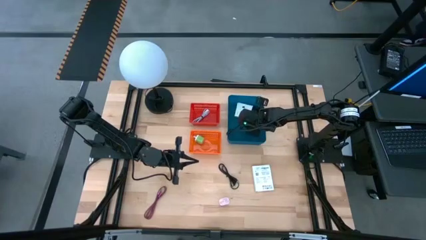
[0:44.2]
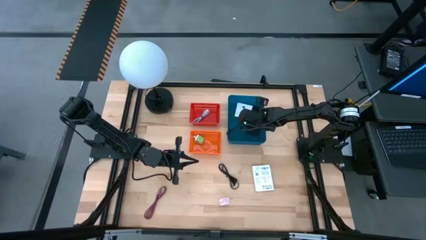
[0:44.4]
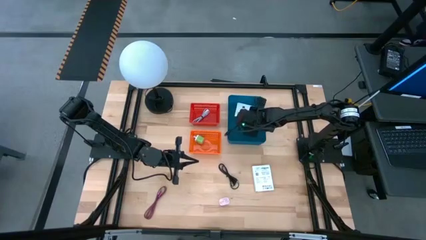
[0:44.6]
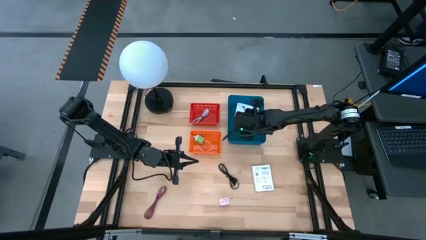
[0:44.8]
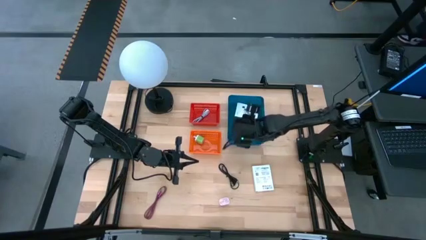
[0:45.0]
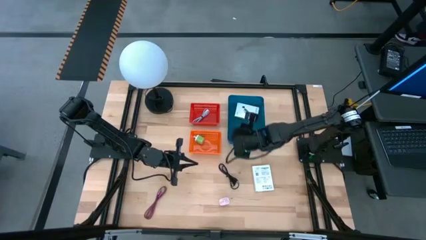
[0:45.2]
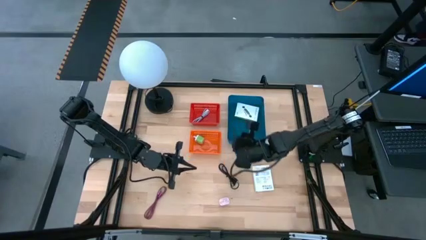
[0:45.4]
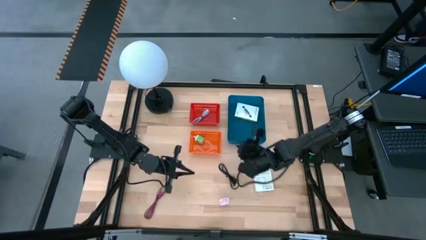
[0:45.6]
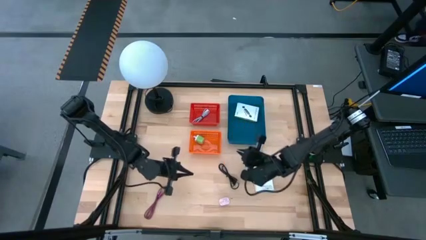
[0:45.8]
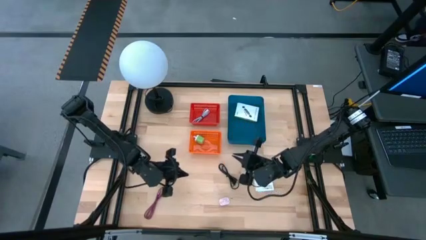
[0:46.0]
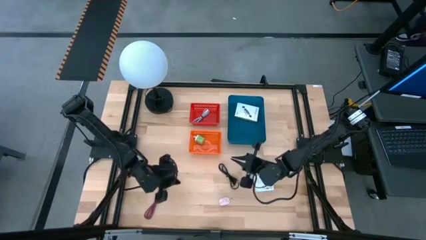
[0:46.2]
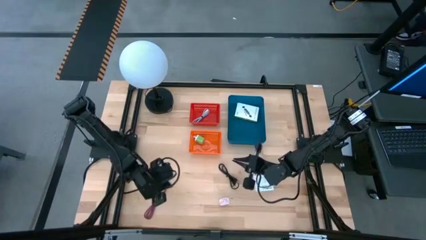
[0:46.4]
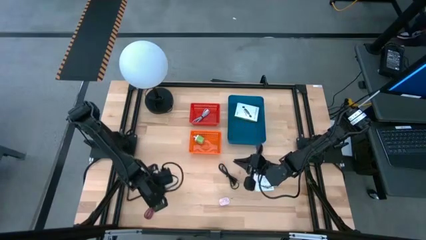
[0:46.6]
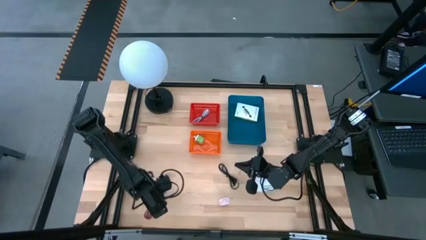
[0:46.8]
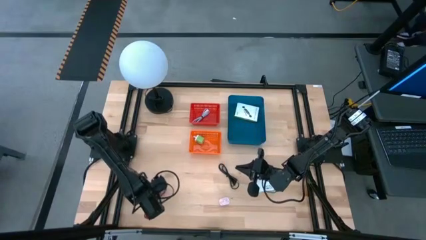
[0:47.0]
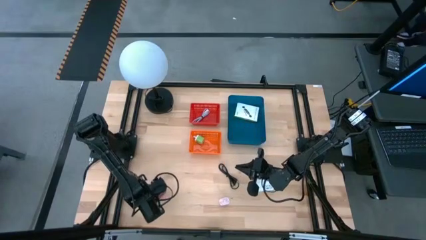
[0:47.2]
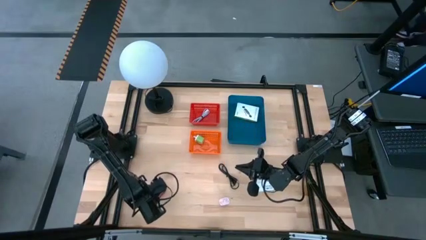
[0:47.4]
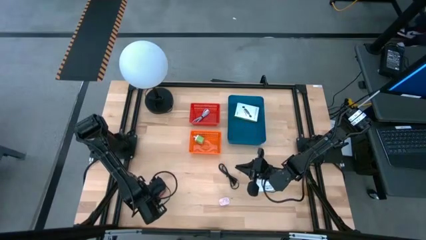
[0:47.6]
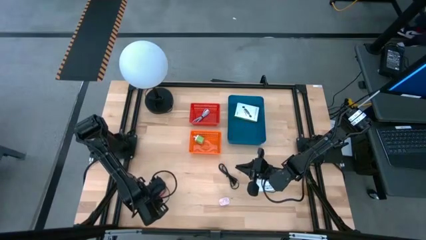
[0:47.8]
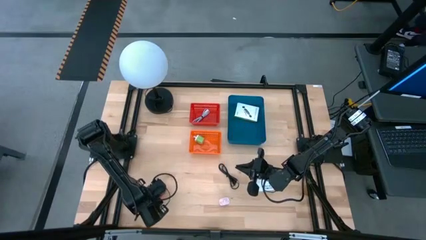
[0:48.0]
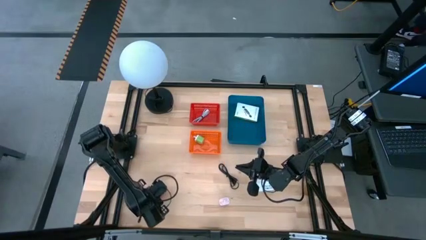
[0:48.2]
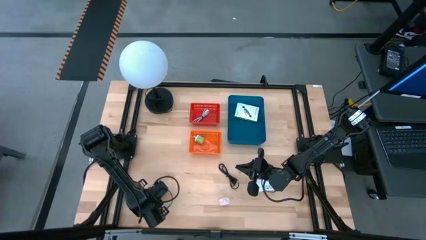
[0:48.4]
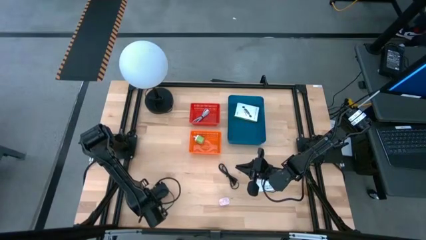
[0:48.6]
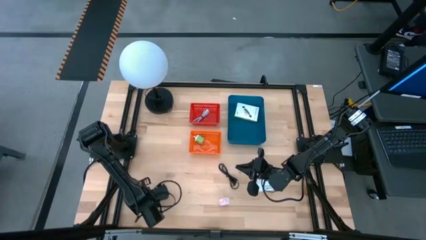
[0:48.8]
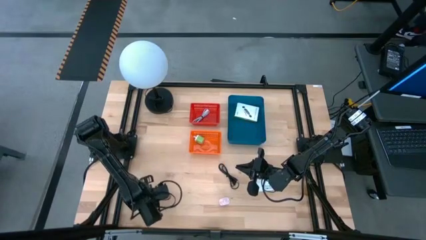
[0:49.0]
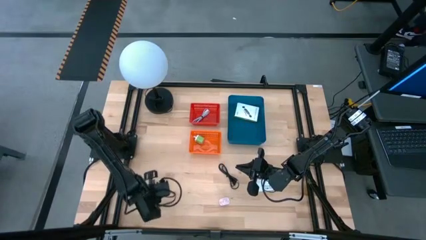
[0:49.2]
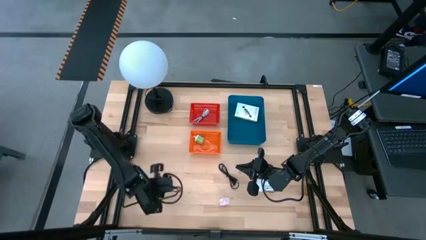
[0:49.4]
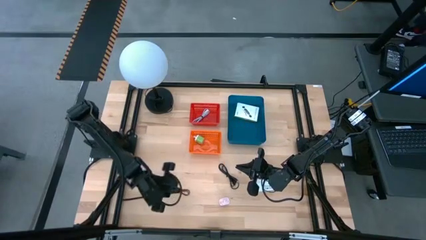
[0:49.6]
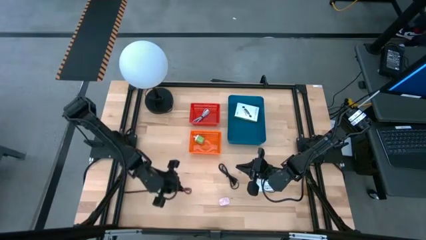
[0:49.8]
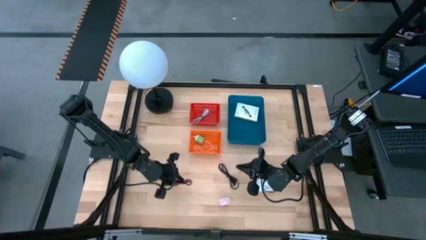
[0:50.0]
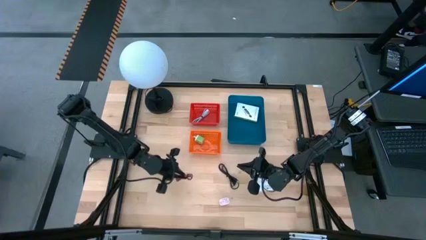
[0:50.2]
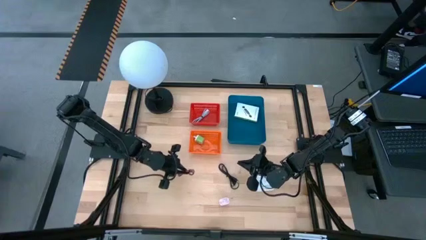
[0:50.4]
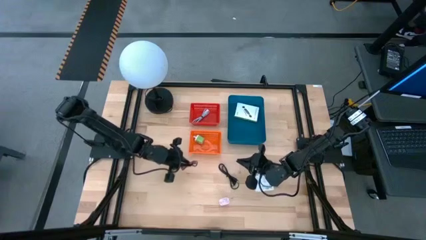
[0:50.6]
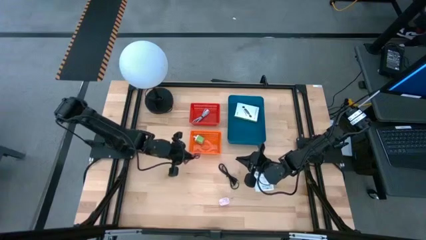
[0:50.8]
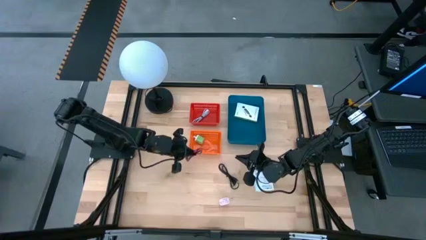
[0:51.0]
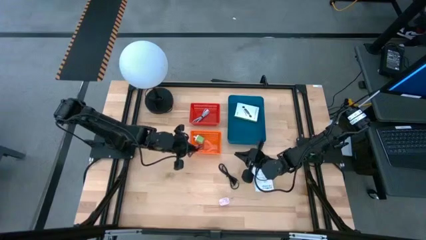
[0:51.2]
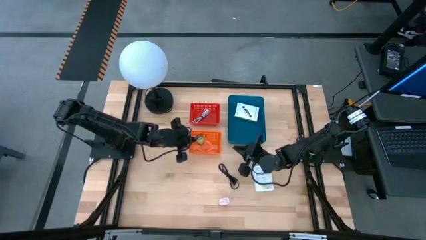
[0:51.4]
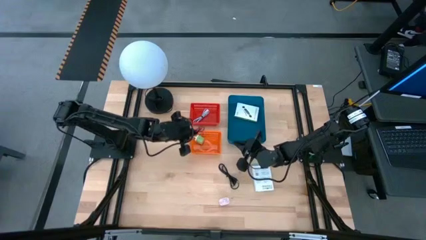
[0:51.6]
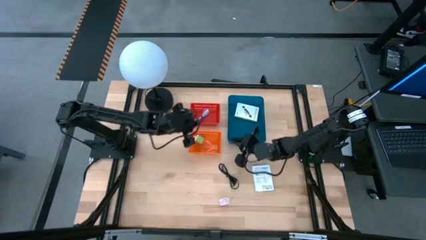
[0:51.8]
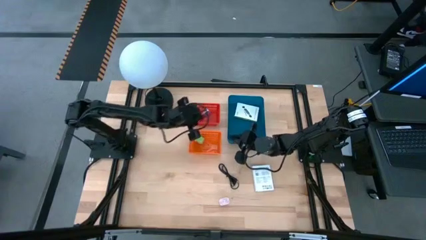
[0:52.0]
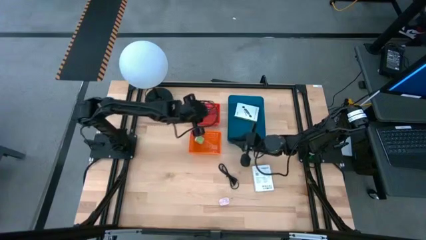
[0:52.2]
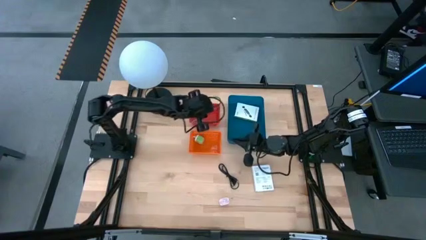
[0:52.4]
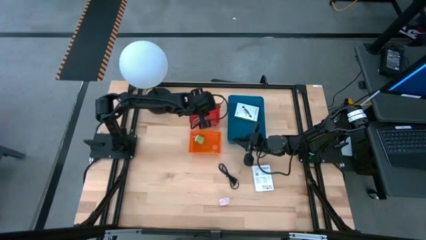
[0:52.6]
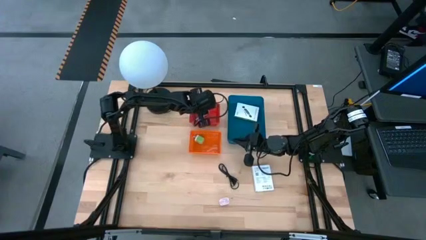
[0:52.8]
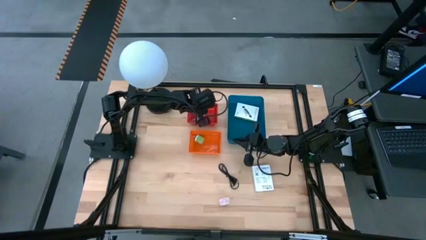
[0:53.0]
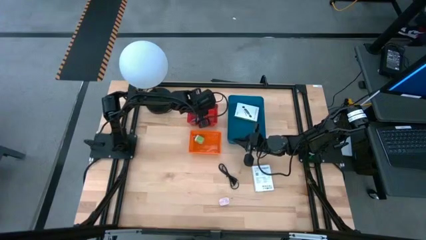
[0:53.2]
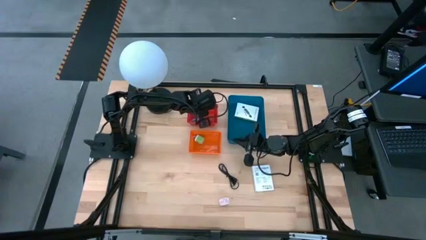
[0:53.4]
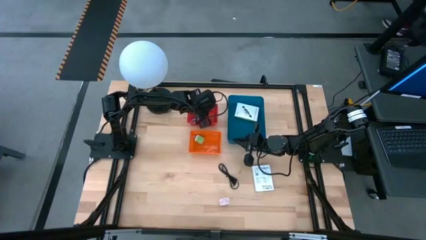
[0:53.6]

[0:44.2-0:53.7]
Task: Pick and place items into bin
Put the pink charger cable into the red bin

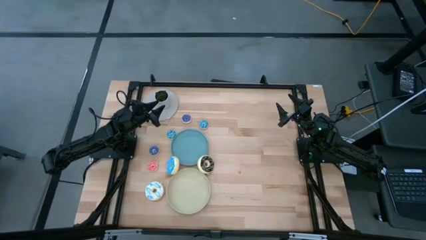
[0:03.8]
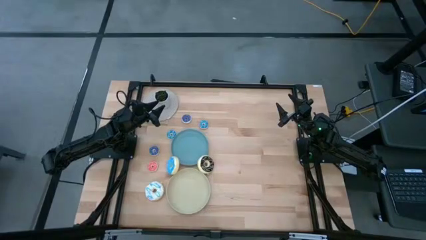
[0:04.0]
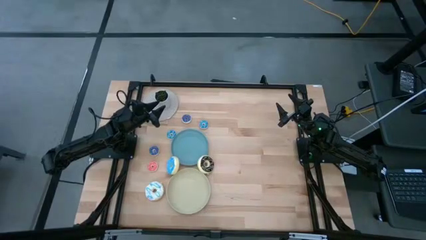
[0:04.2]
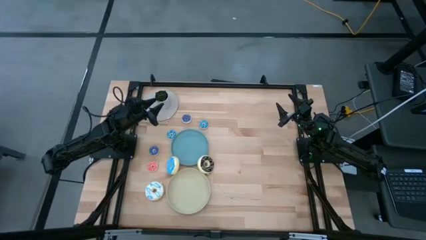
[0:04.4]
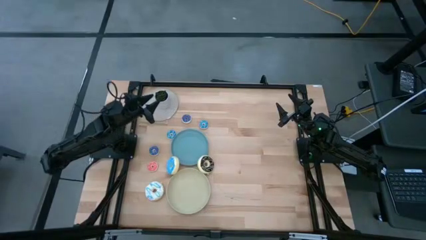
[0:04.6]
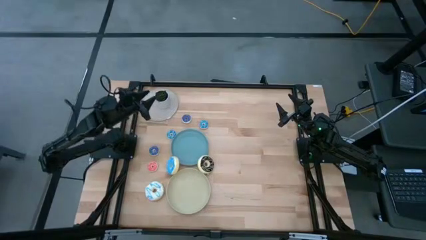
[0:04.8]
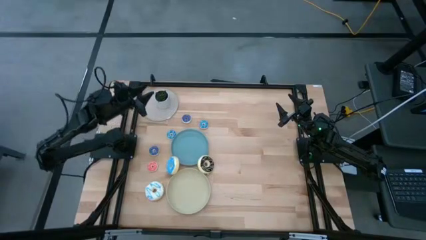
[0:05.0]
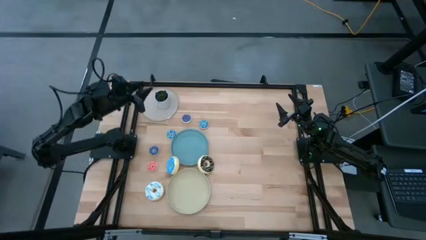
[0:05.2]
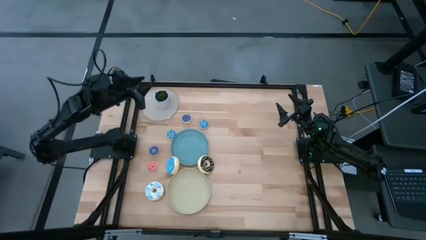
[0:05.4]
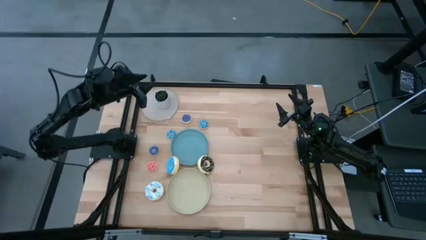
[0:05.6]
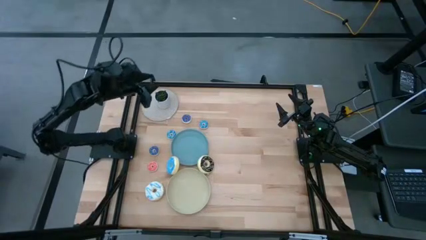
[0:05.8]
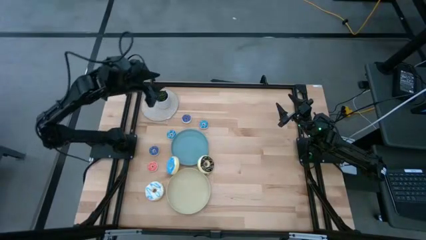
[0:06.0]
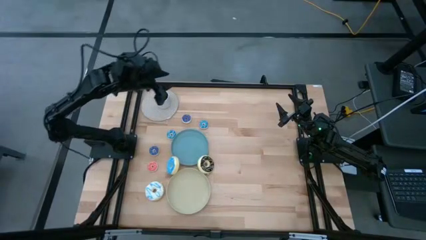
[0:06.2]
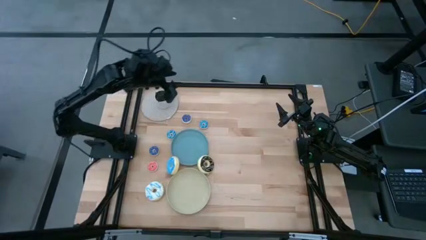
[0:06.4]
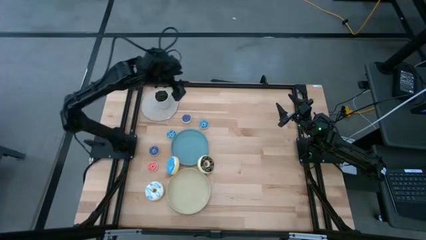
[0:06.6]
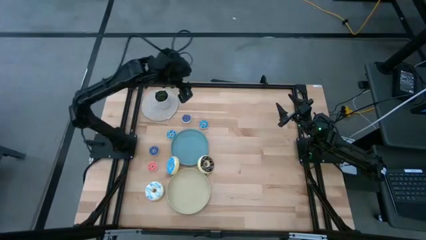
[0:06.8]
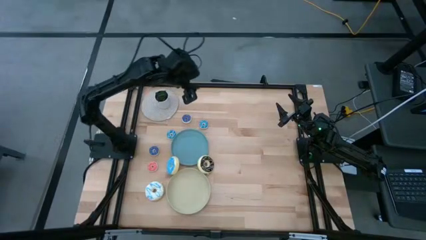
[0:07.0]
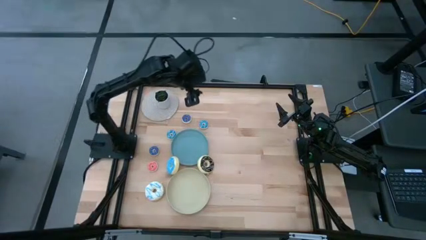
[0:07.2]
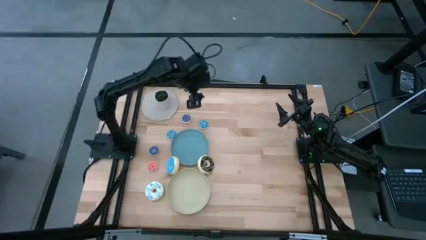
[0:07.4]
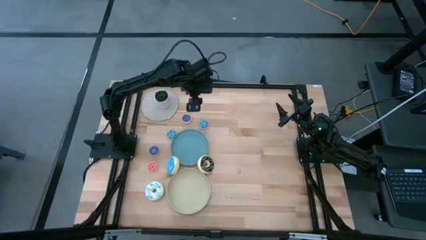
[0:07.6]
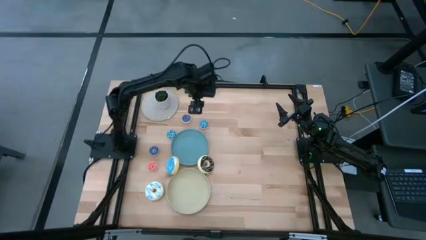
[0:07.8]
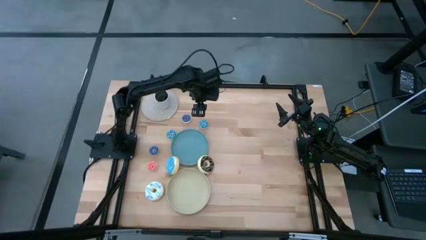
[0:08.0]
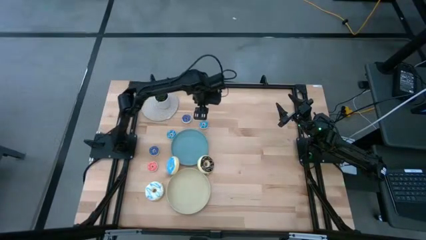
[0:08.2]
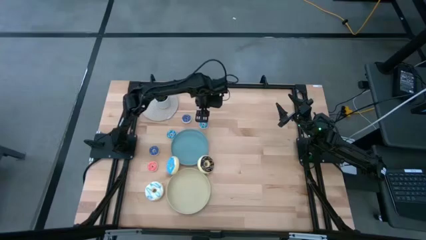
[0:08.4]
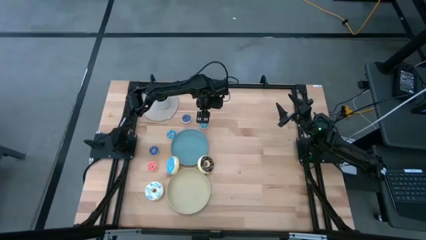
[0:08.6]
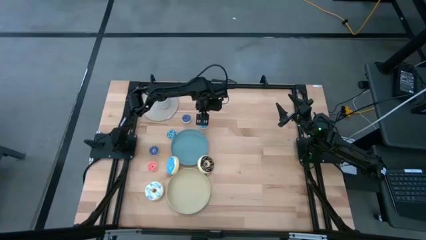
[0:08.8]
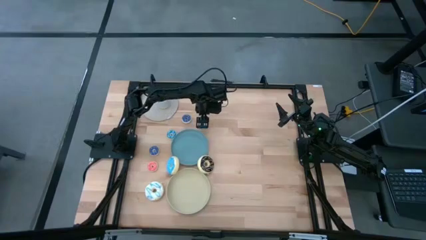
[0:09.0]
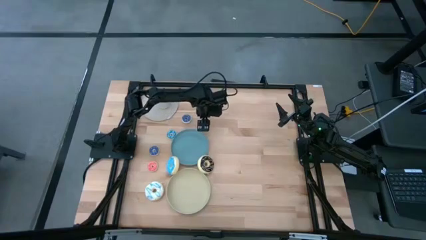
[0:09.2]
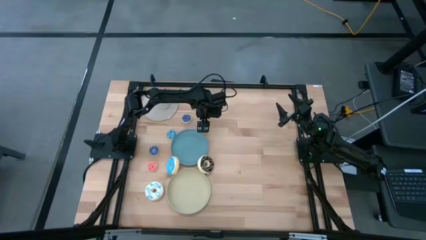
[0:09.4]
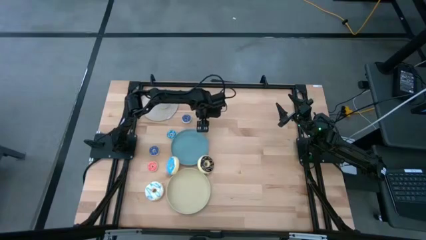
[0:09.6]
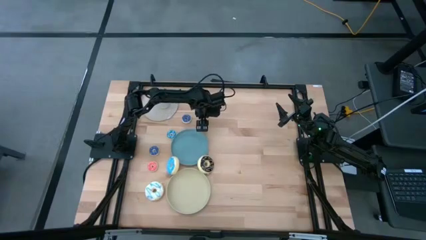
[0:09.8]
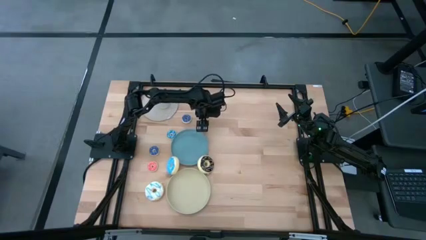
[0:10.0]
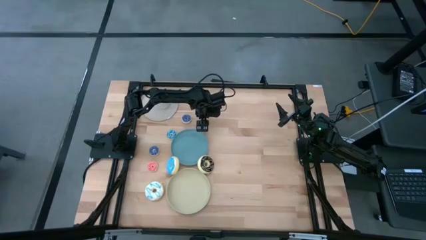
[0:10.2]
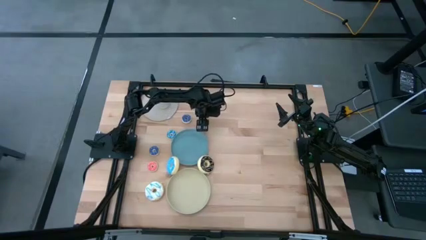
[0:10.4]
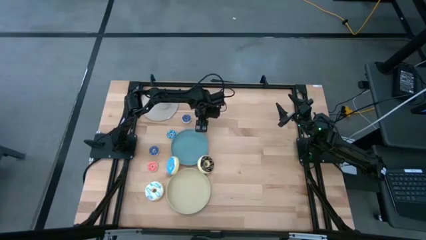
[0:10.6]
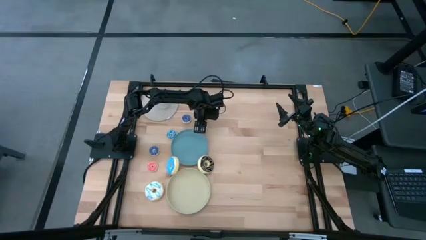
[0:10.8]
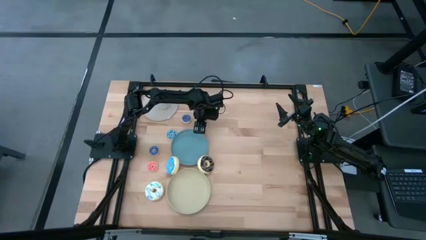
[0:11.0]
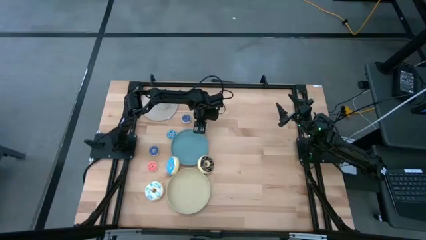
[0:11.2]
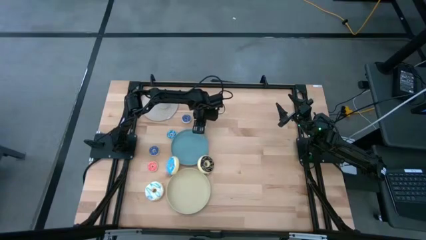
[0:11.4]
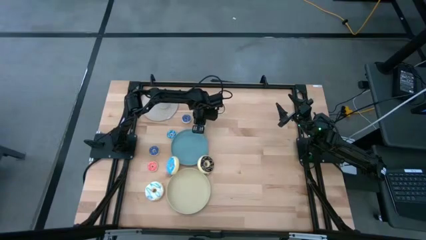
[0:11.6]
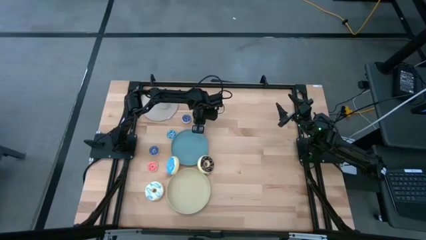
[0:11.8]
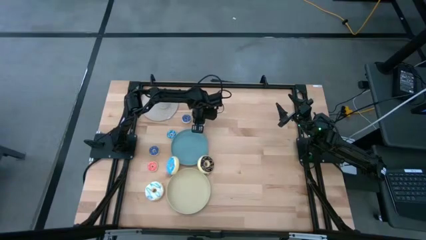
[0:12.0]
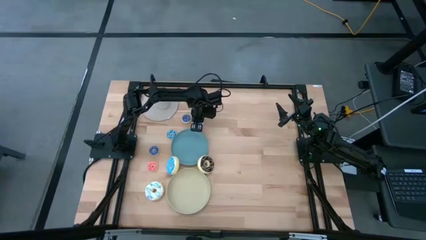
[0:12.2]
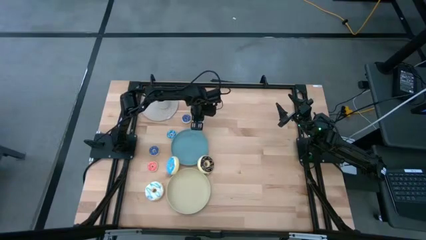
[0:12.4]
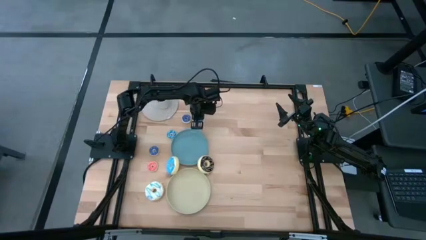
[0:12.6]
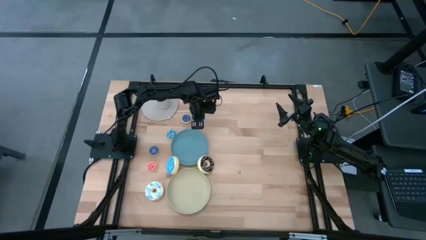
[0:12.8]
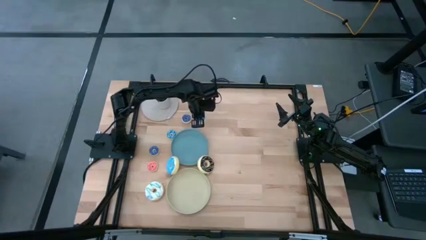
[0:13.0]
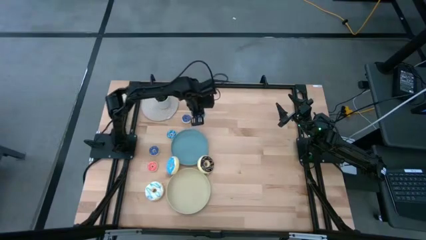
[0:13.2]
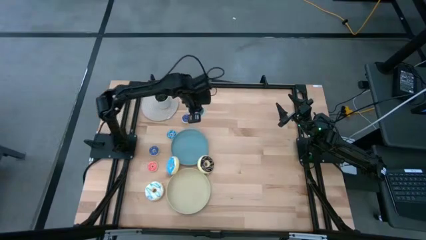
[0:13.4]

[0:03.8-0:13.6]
Task: Pick & Place donuts
Put the right small light blue donut on the gray plate
